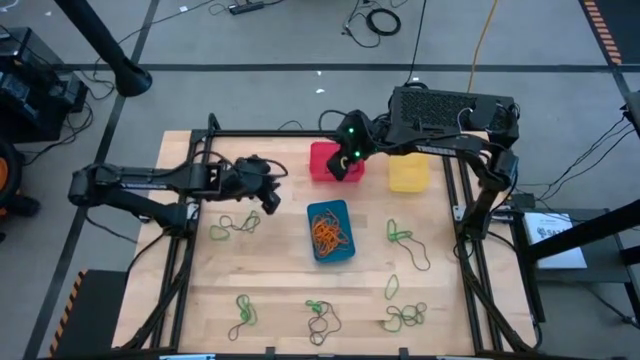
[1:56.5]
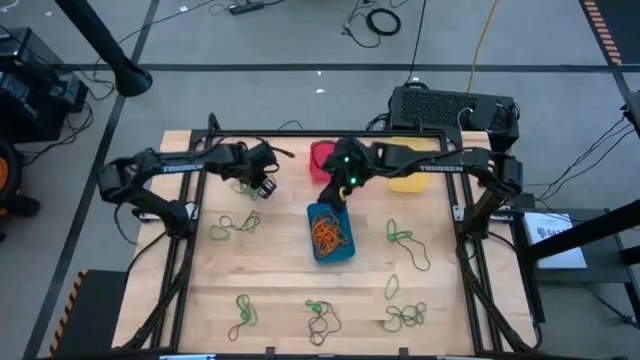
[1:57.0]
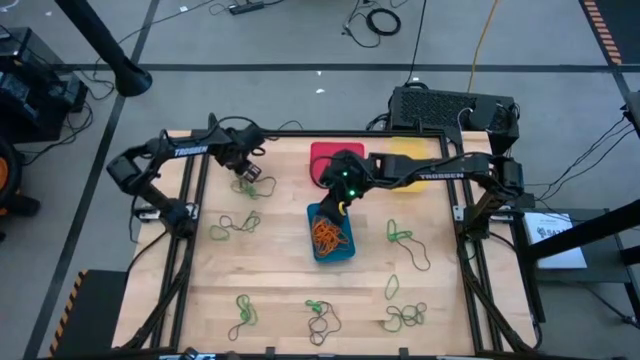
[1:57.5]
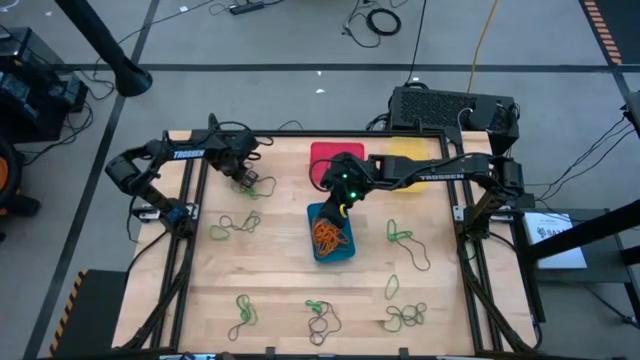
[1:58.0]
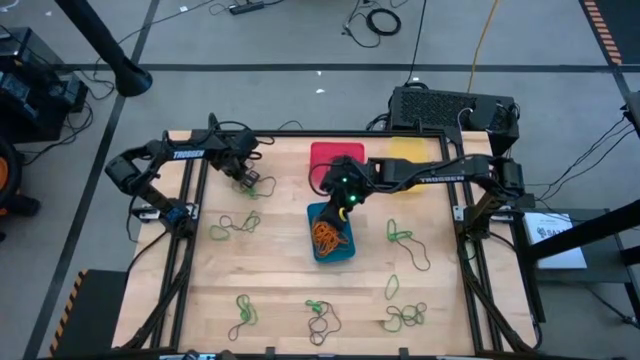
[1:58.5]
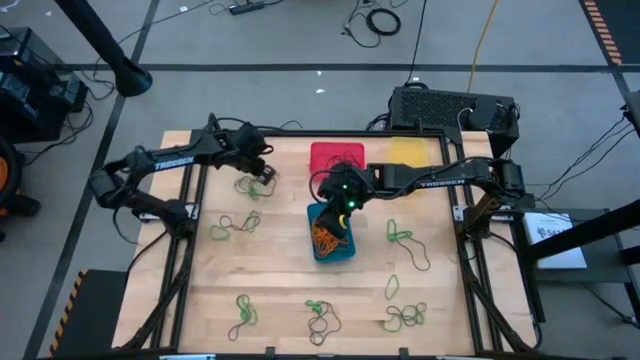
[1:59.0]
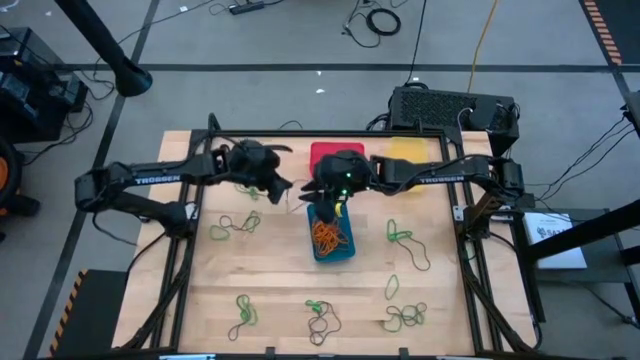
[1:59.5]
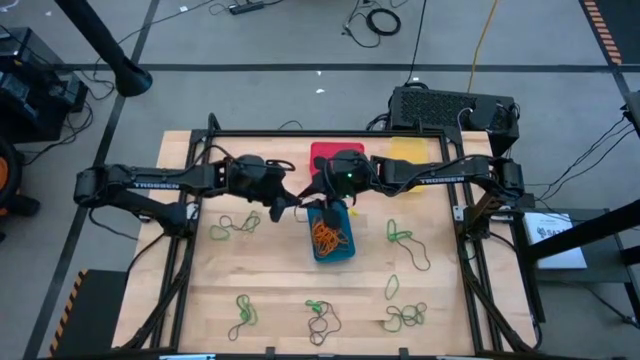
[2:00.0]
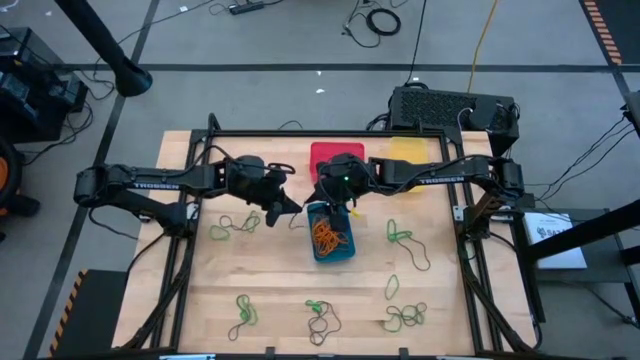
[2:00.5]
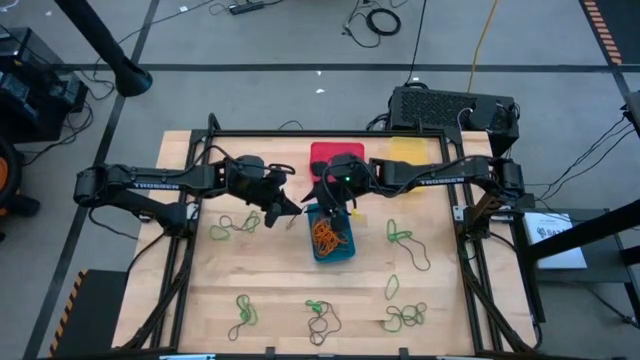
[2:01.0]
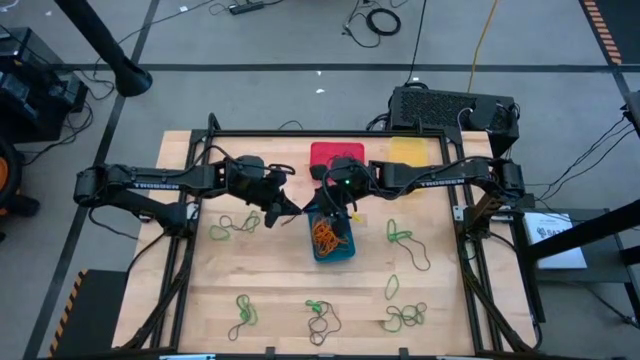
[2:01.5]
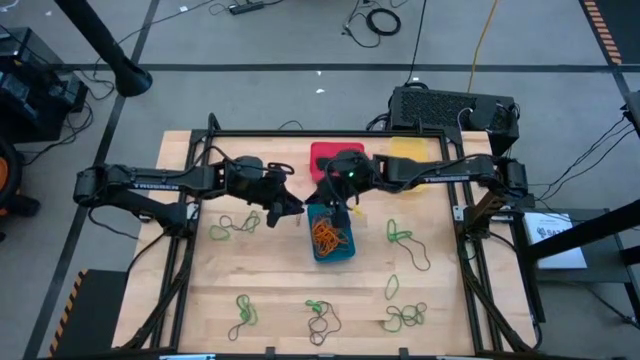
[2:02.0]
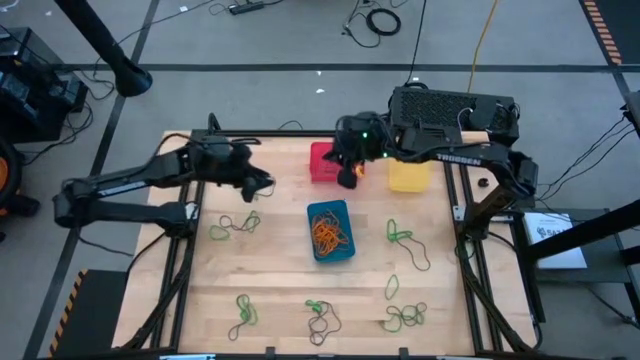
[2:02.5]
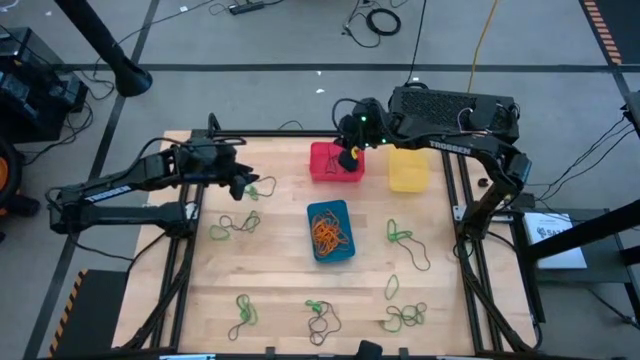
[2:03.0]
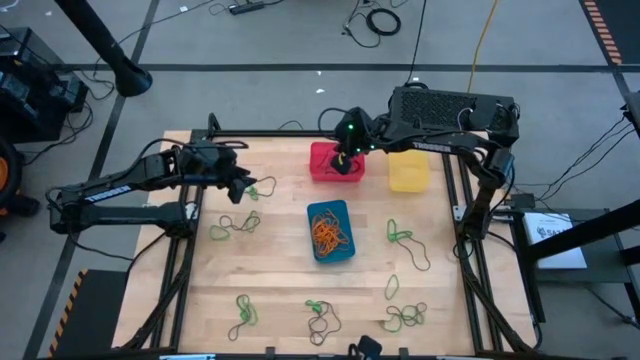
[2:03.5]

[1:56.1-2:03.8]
Task: Sort rubber bands into baskets
Put the purple rubber band into the red bin

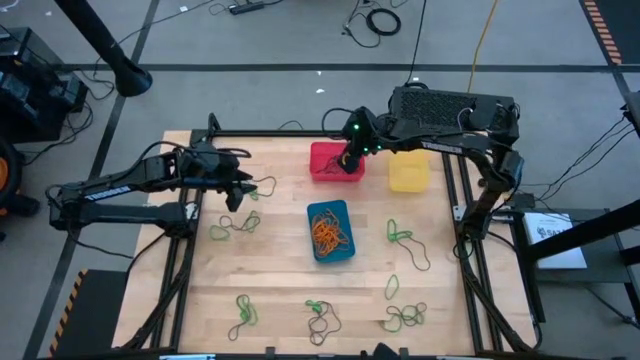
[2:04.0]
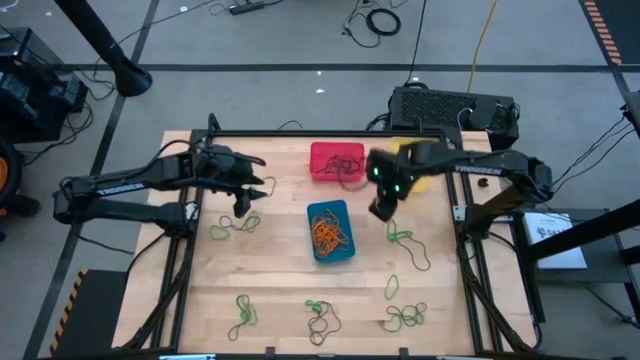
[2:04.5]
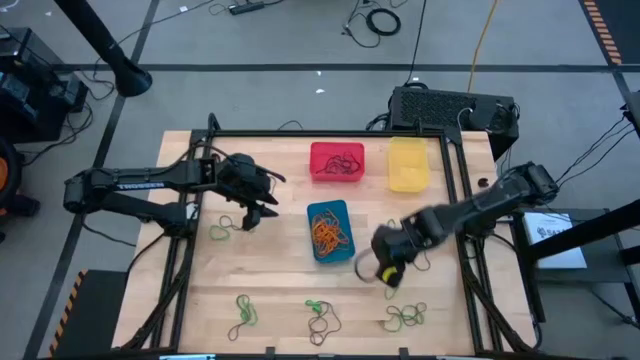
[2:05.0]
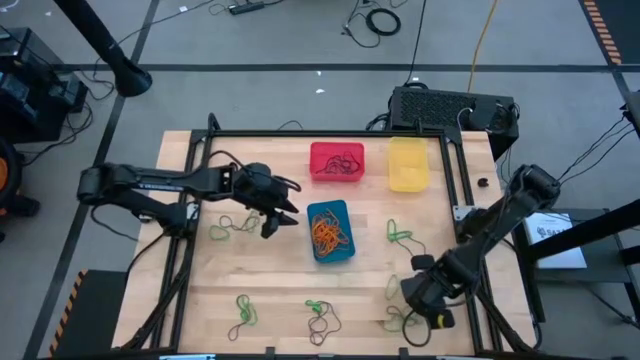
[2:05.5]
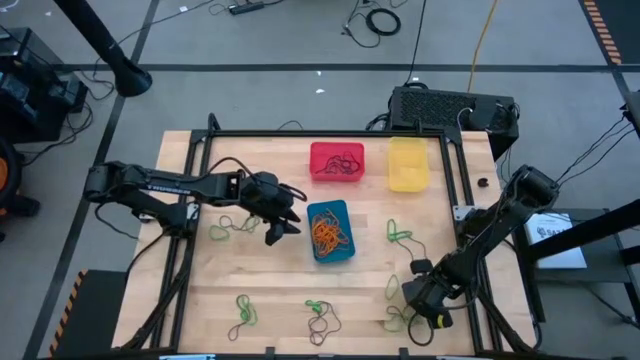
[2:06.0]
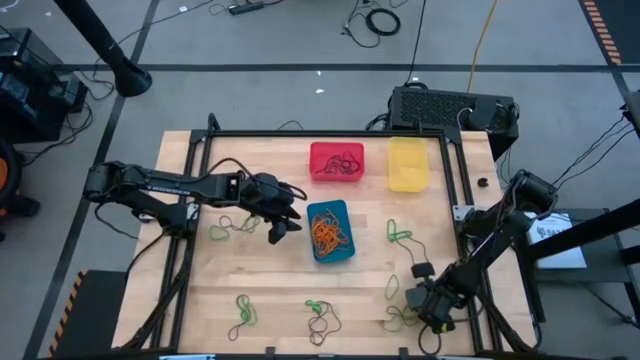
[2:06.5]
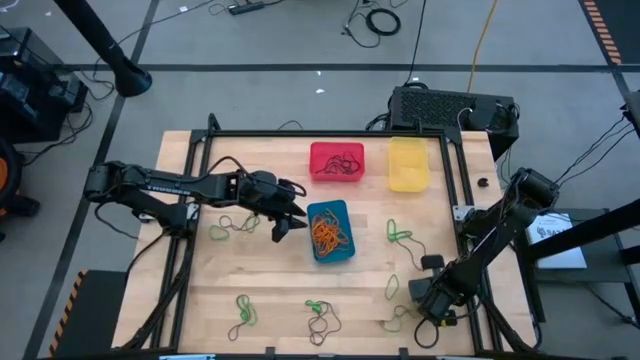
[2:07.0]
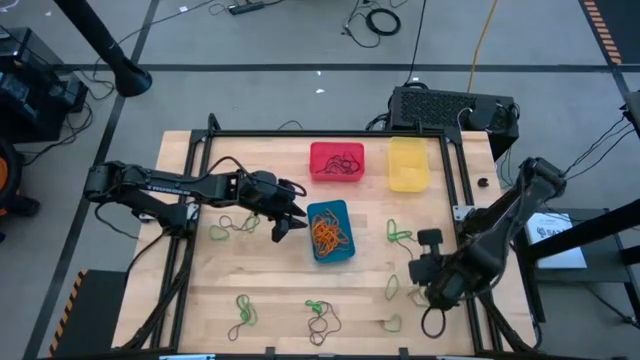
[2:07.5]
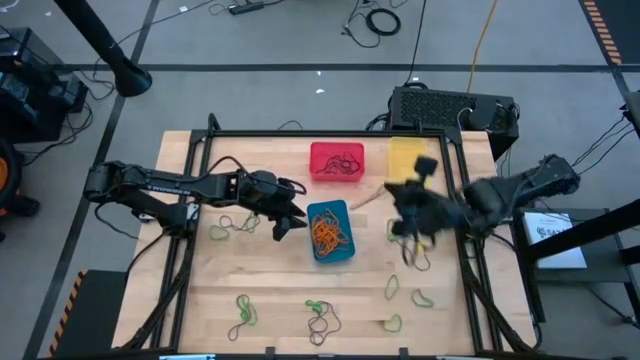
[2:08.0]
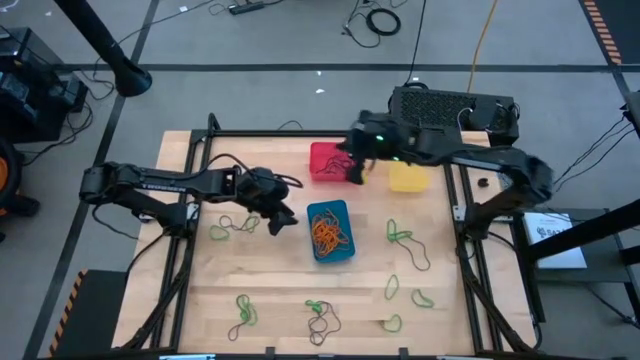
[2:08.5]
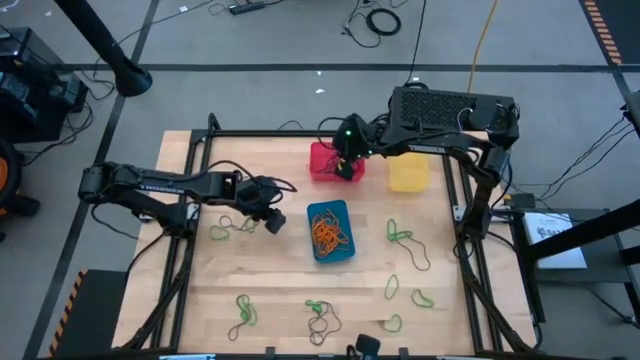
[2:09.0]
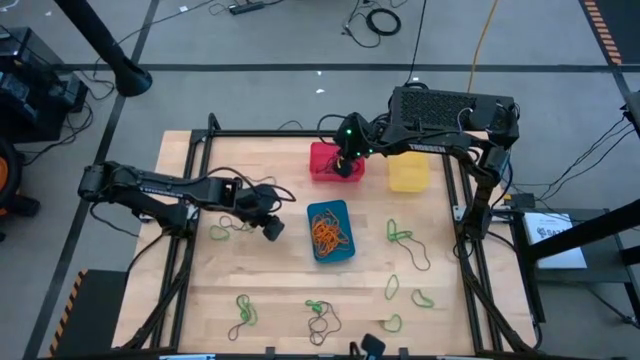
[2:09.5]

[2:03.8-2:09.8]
Put the purple rubber band into the red bin

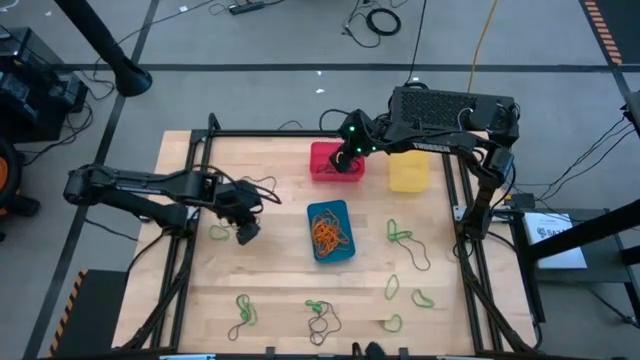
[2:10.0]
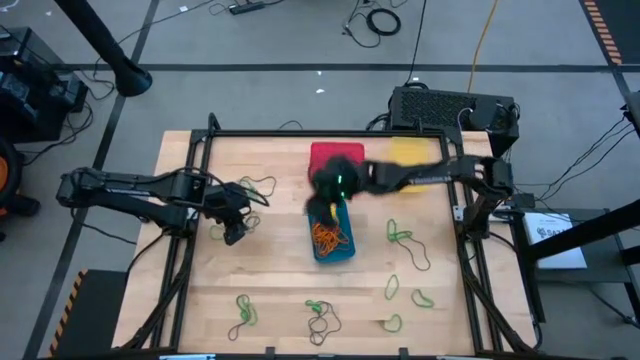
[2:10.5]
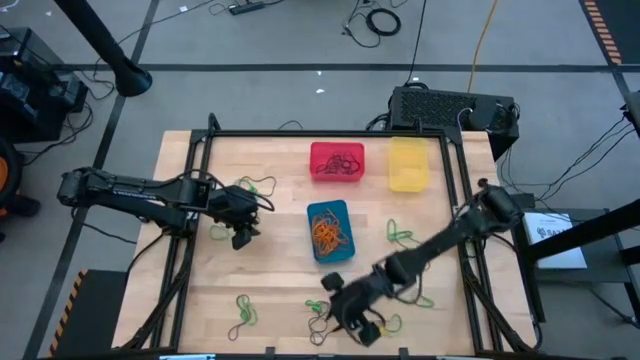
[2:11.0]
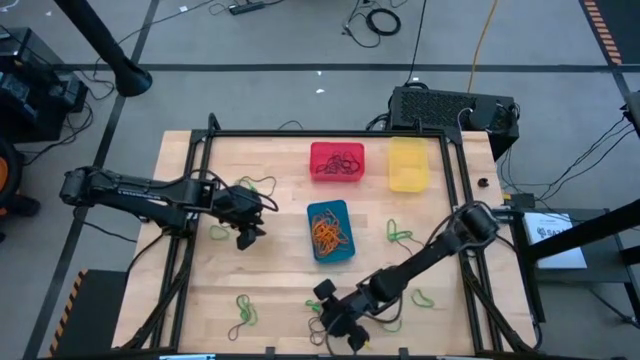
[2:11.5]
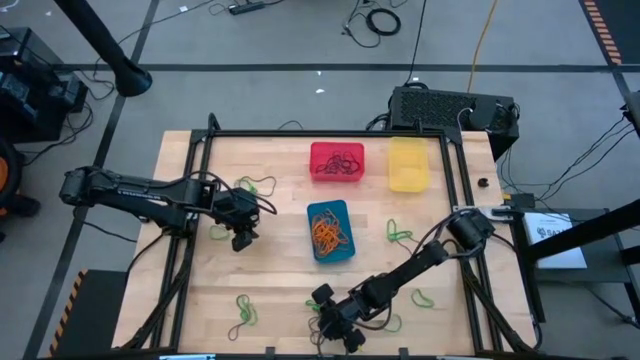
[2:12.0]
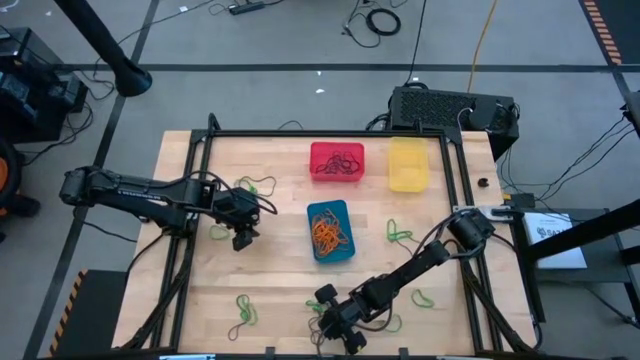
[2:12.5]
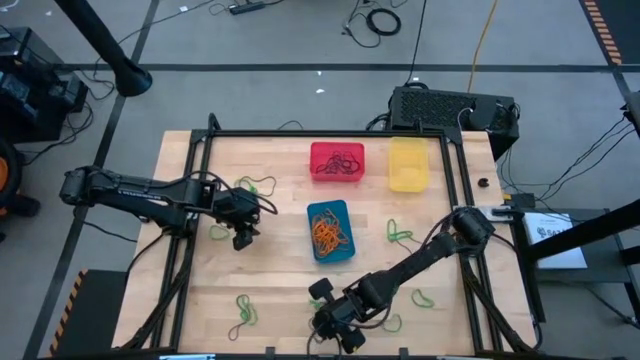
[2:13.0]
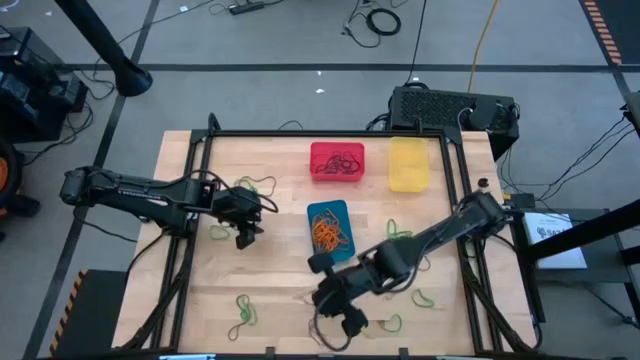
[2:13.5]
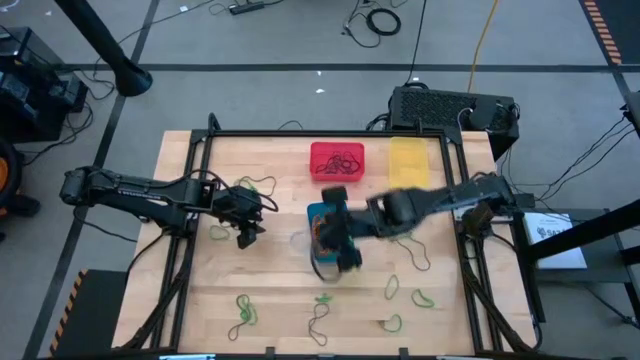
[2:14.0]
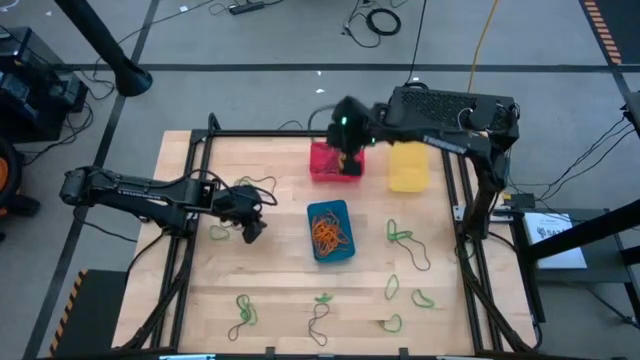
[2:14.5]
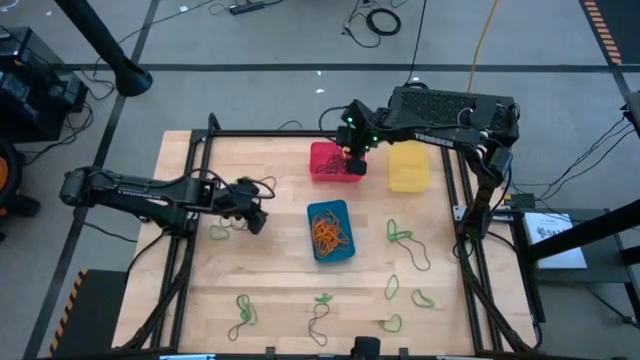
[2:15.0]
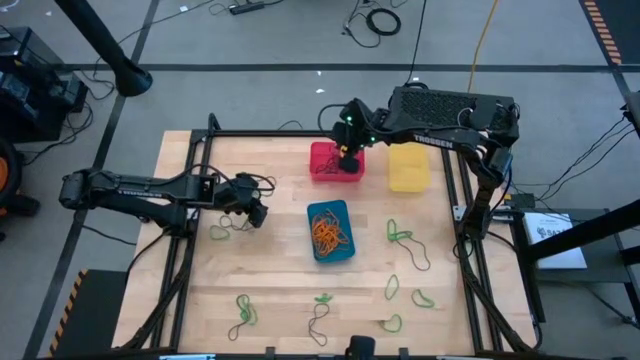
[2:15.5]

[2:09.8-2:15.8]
Put the purple rubber band into the red bin

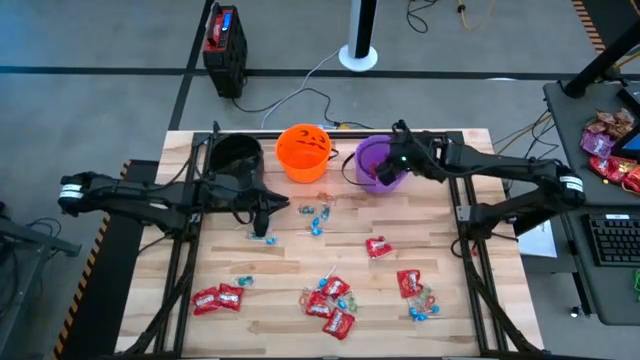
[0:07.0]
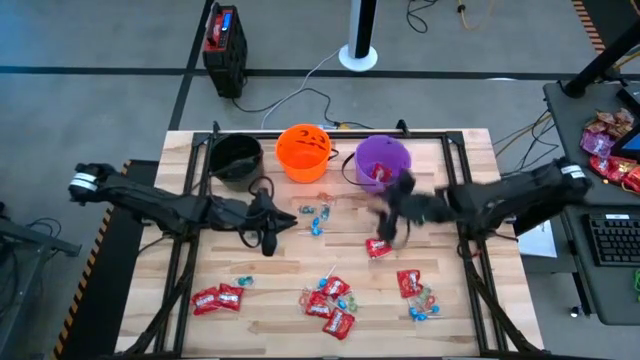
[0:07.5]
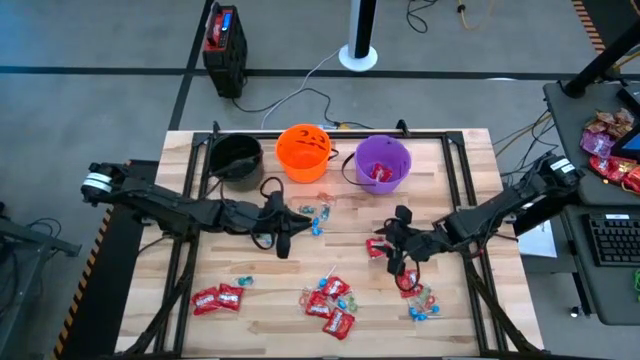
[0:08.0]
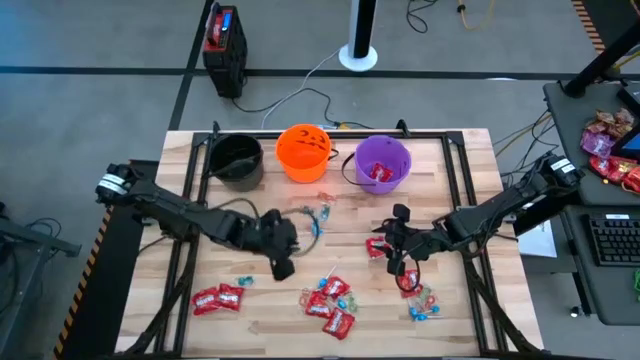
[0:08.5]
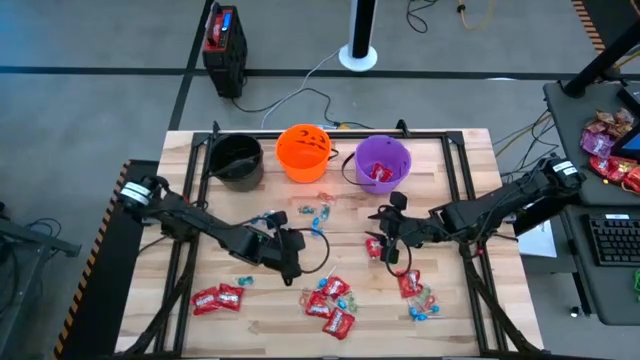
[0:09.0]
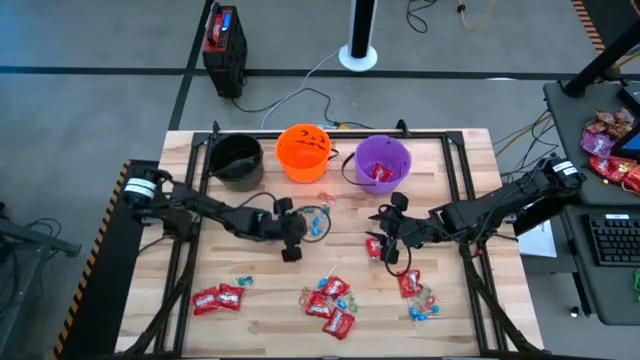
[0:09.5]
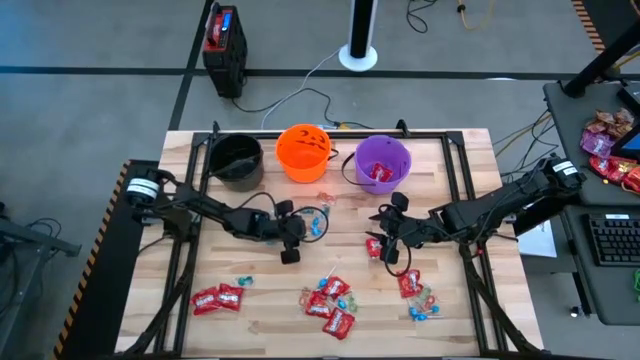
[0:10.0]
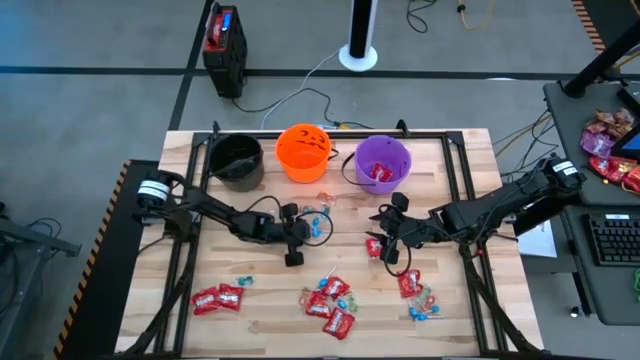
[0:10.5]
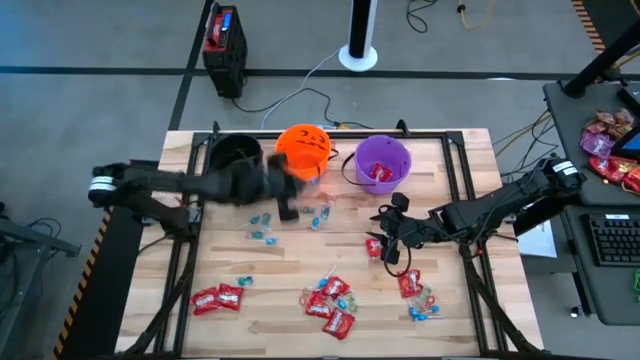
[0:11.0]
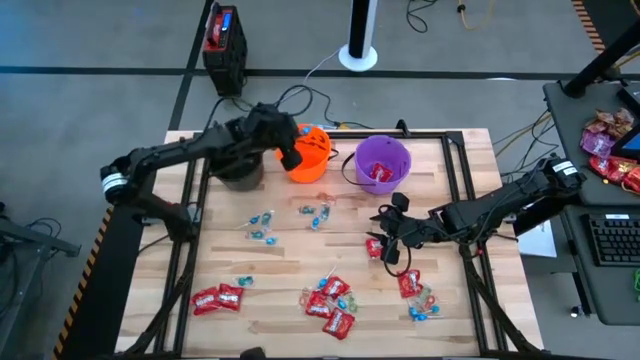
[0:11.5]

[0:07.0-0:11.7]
Task: Sort candy by brand, put in halloween buckets
Put the blue candy into the orange bucket
